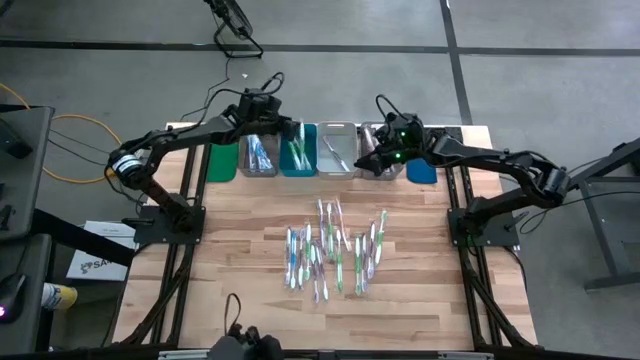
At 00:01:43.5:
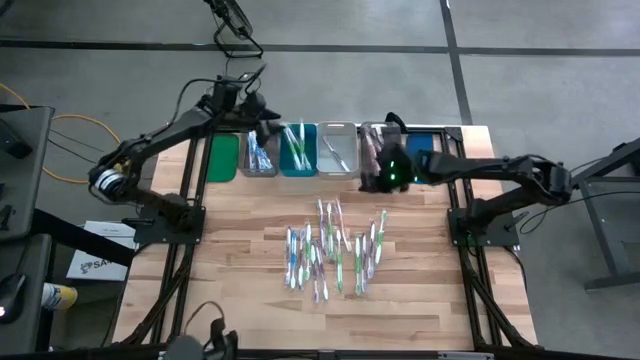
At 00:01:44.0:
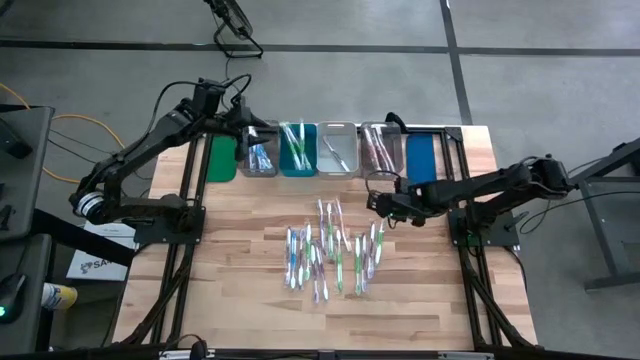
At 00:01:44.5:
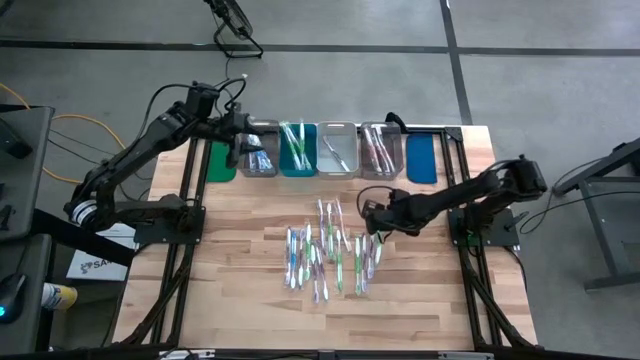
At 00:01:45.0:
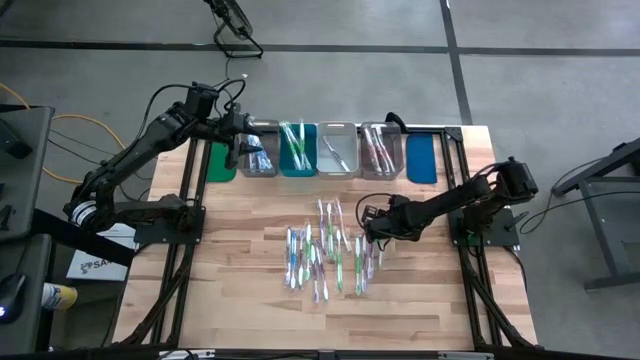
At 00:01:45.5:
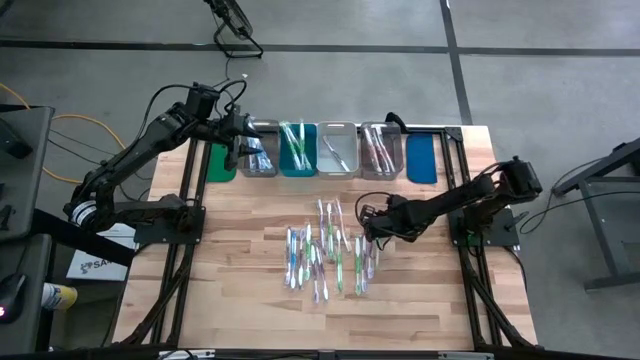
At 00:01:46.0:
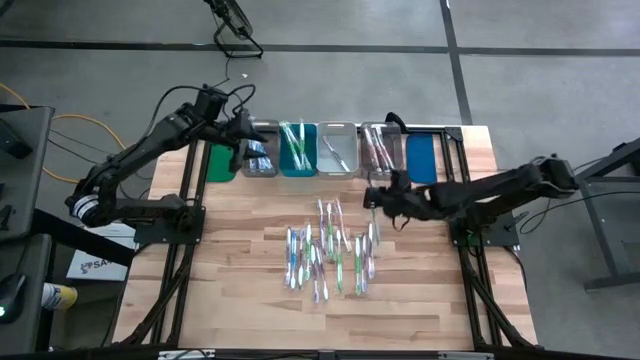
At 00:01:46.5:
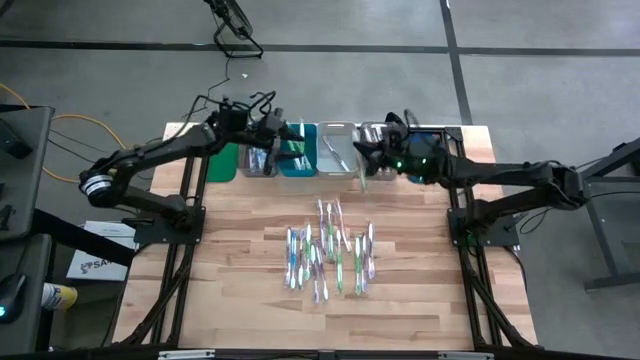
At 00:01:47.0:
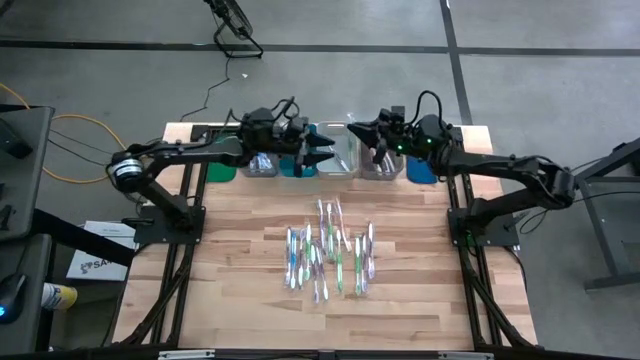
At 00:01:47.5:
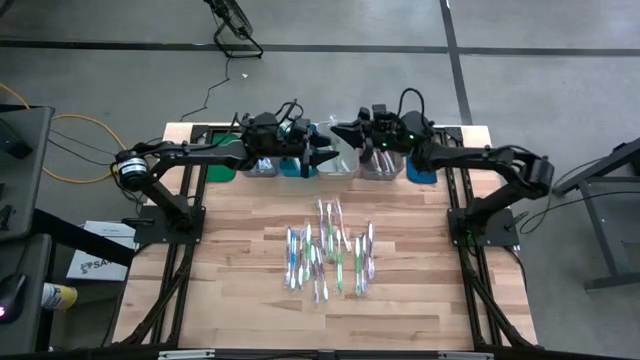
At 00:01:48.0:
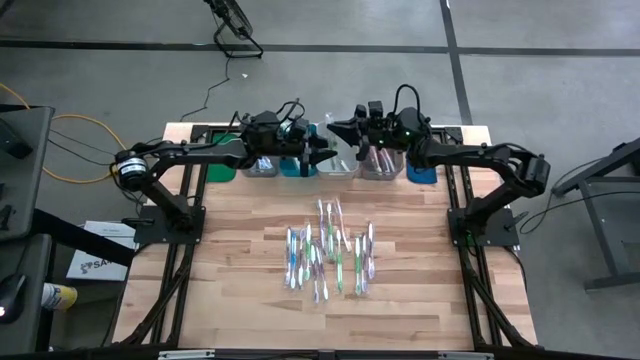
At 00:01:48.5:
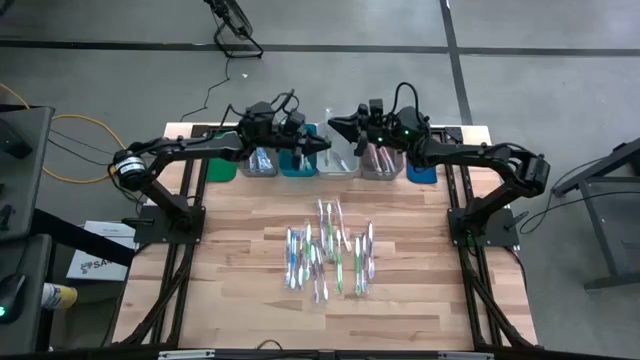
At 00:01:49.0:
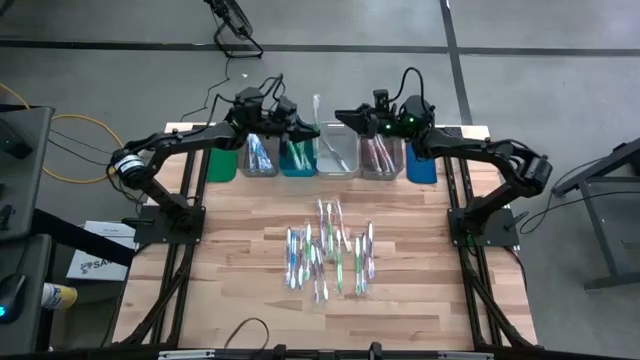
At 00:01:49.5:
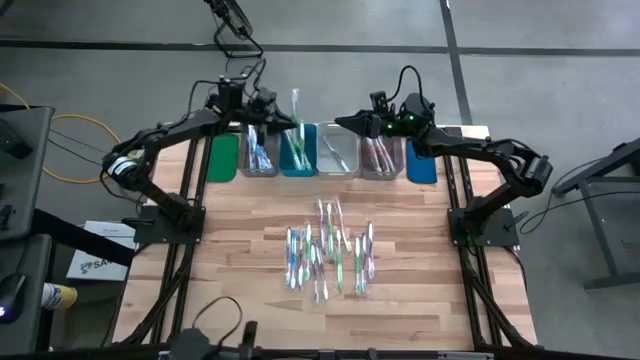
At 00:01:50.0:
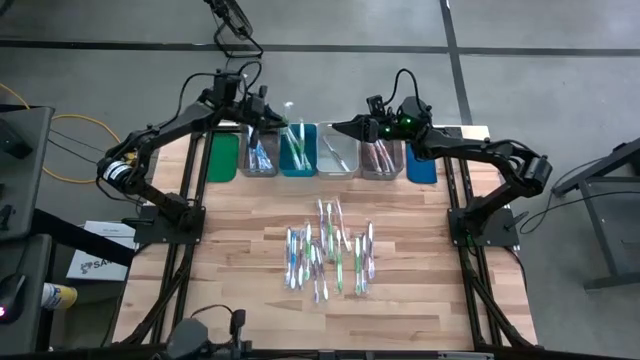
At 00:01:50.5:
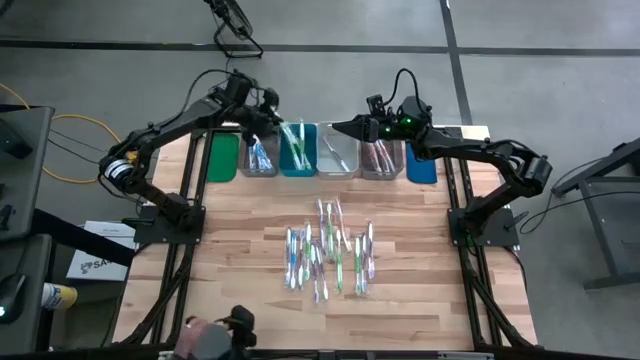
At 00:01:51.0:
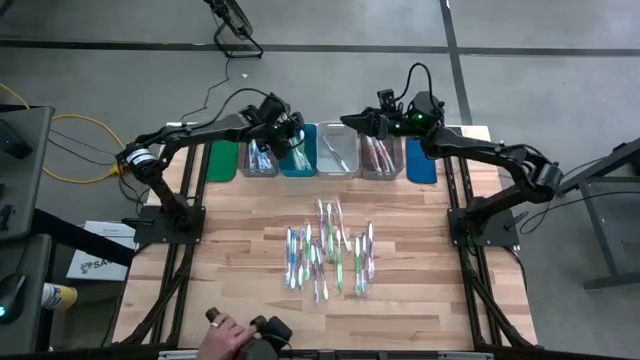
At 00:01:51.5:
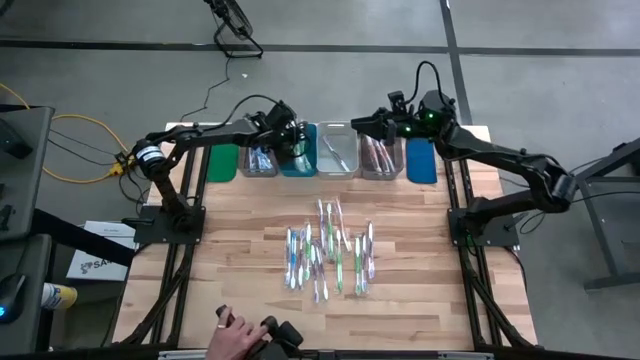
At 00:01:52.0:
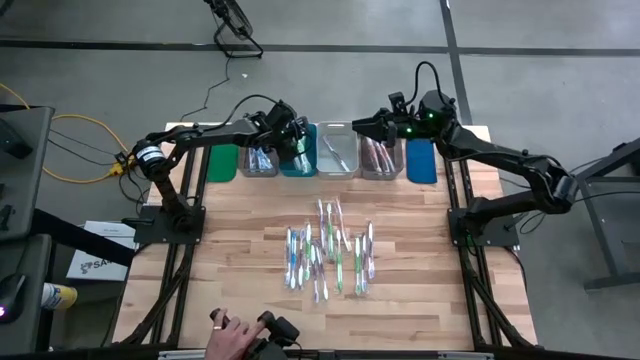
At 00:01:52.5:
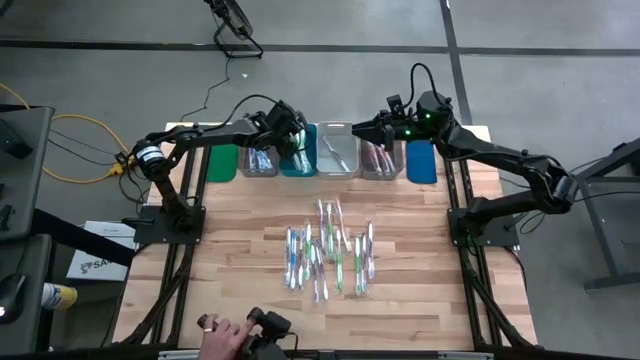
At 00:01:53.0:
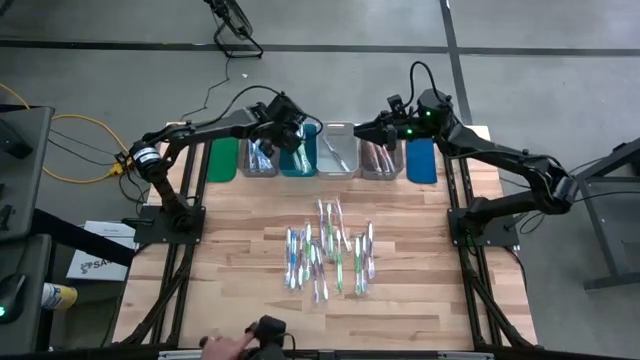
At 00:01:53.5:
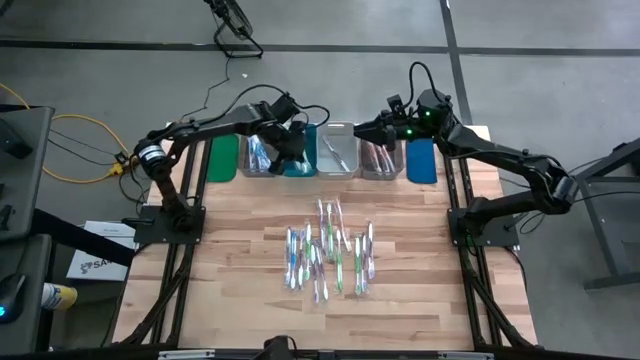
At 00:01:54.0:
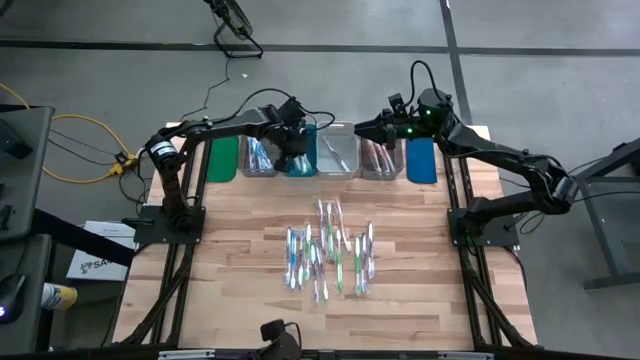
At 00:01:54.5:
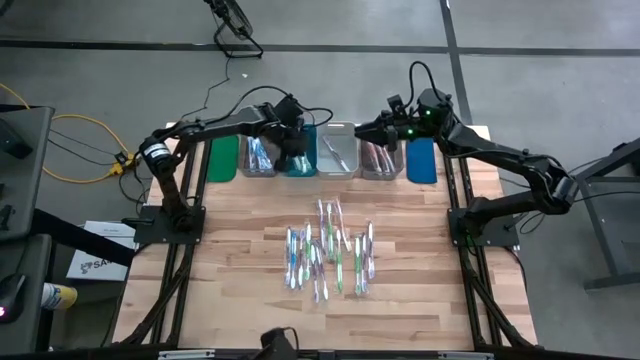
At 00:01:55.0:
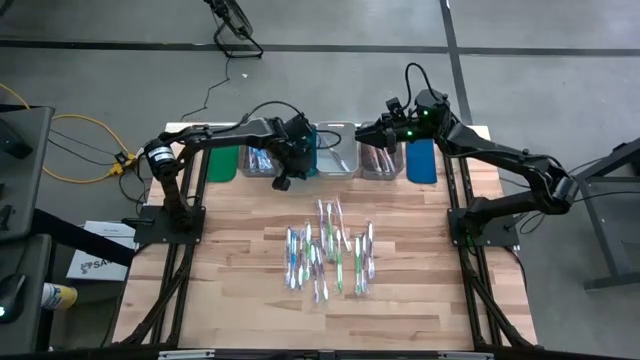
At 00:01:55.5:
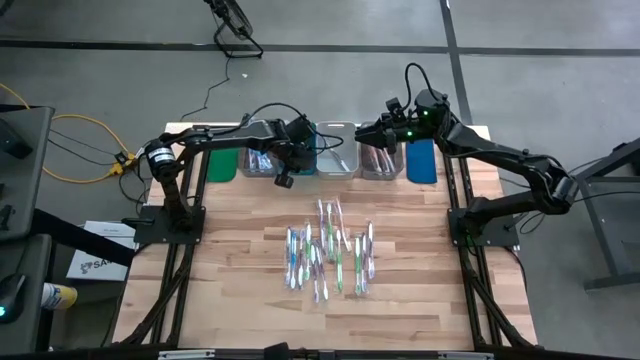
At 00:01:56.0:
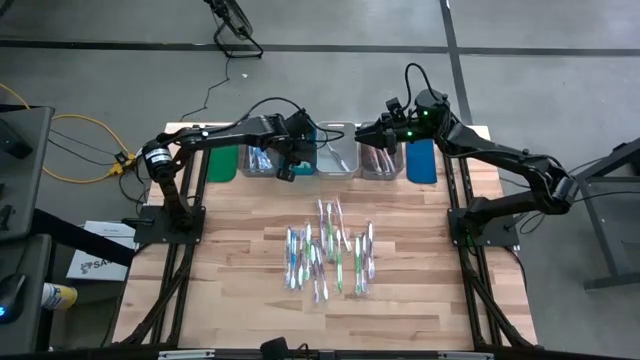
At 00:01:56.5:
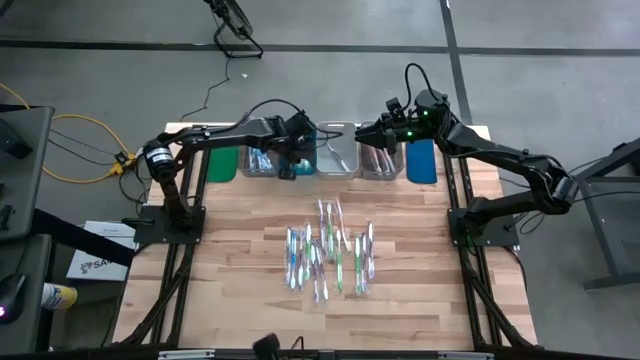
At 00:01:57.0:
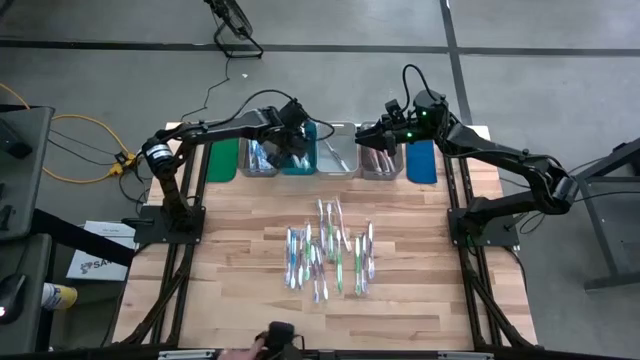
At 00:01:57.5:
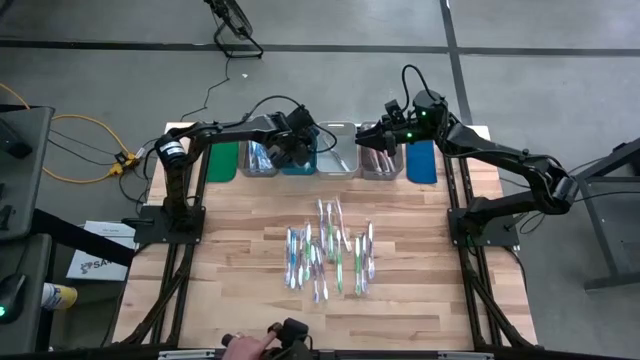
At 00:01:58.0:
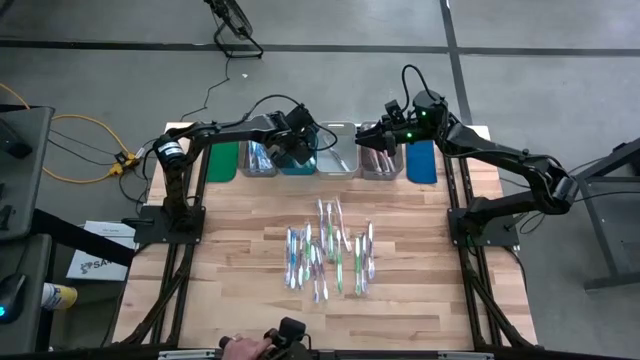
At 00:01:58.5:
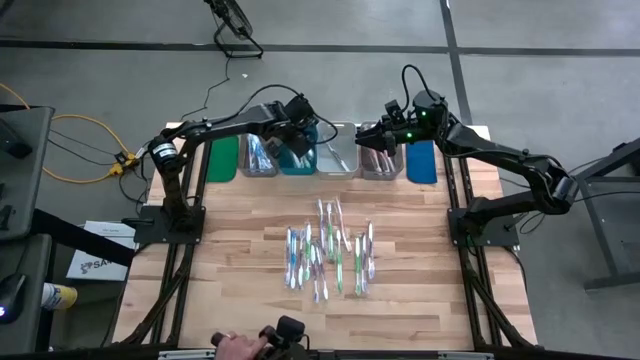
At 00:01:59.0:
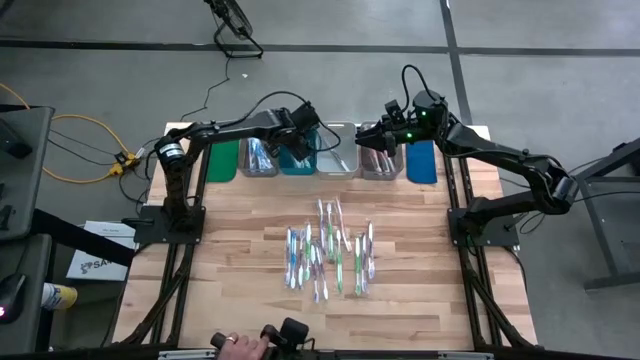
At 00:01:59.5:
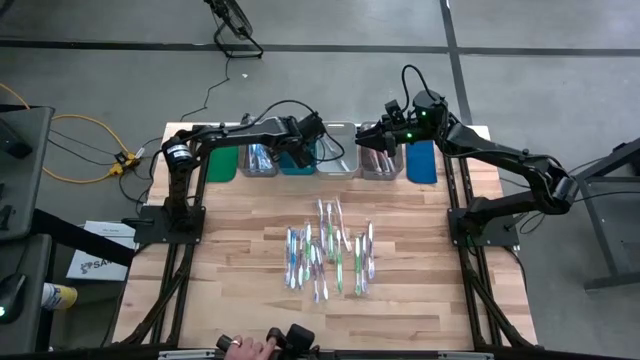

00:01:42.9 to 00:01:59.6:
Task: Pick & Place Toothbrushes
Put the green toothbrush into the blue bin

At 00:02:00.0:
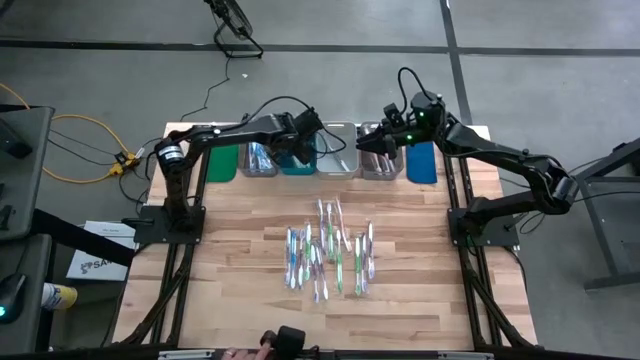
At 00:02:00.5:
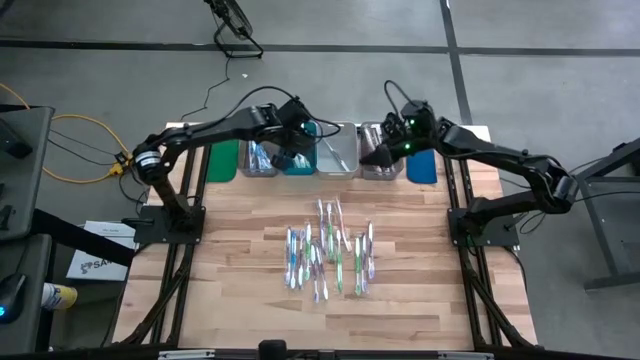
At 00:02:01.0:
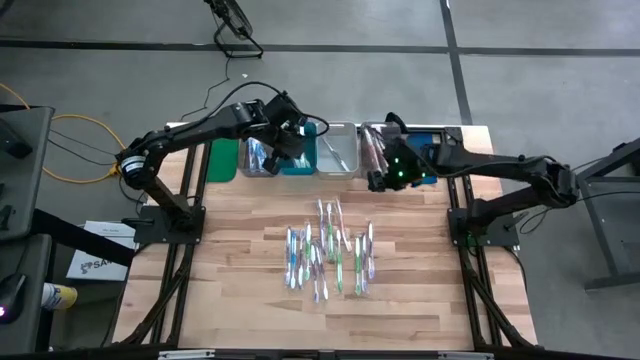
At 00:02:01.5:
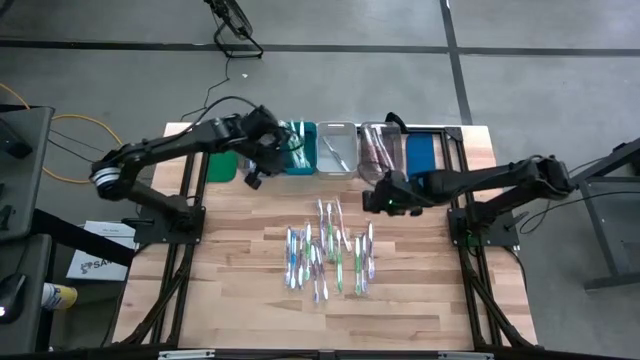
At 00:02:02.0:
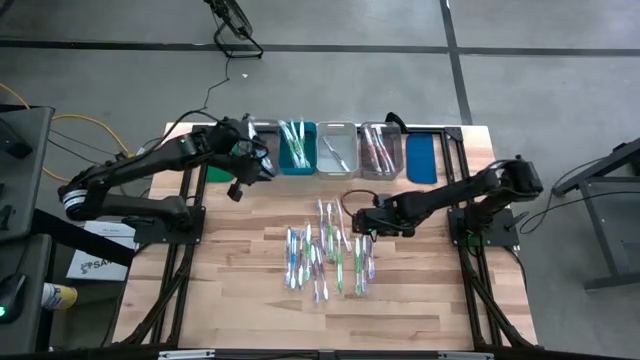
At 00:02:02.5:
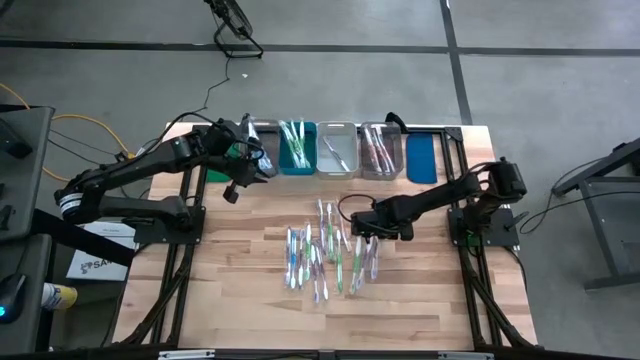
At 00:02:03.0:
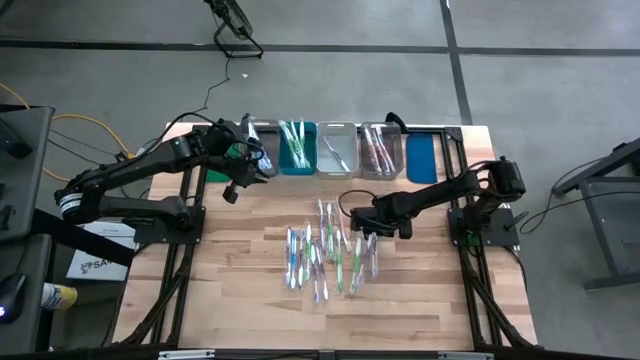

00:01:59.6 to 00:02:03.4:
Put the purple toothbrush into the white bin
